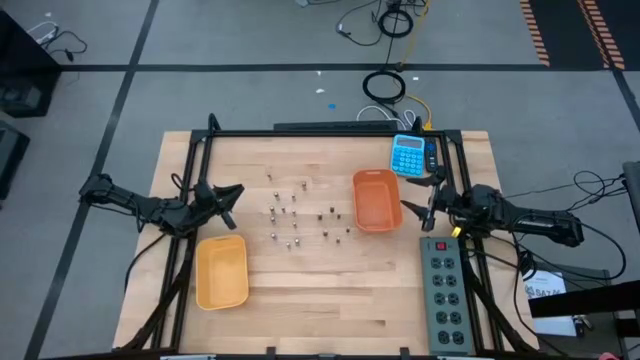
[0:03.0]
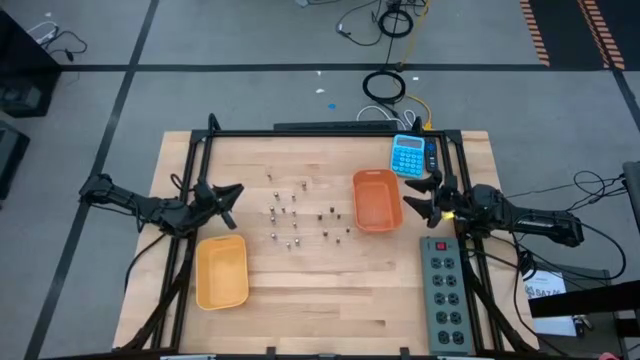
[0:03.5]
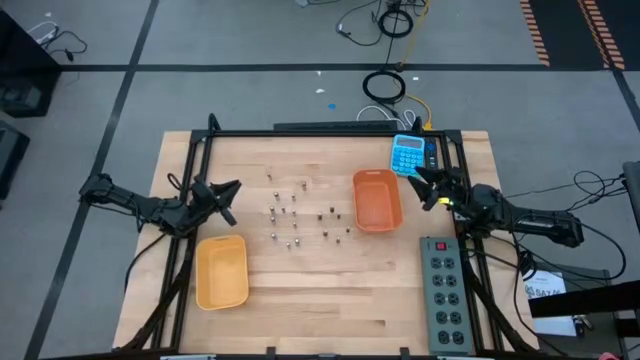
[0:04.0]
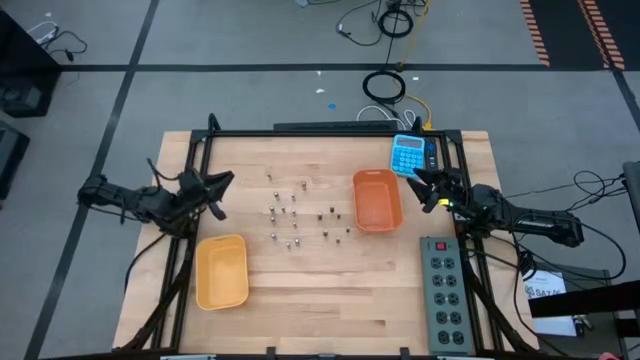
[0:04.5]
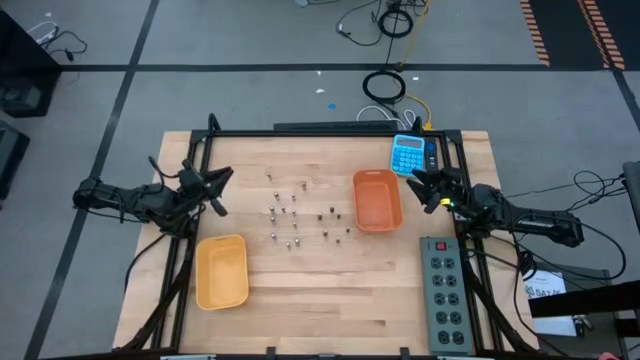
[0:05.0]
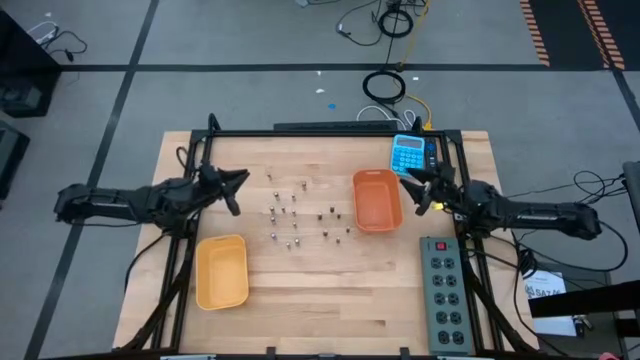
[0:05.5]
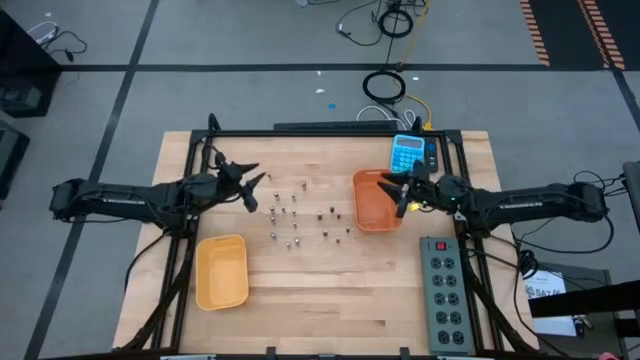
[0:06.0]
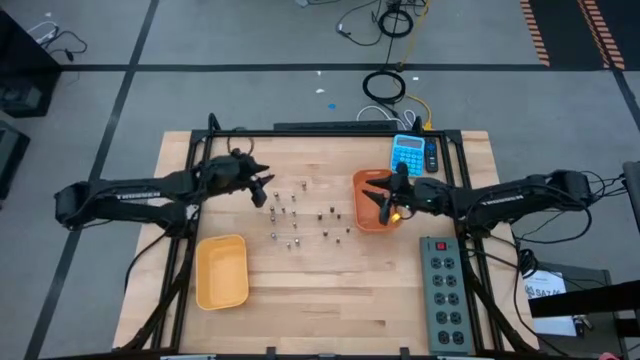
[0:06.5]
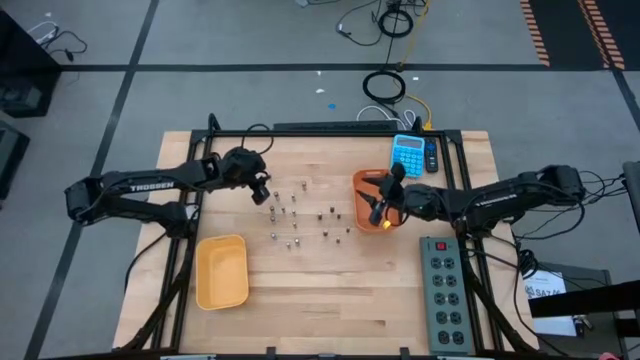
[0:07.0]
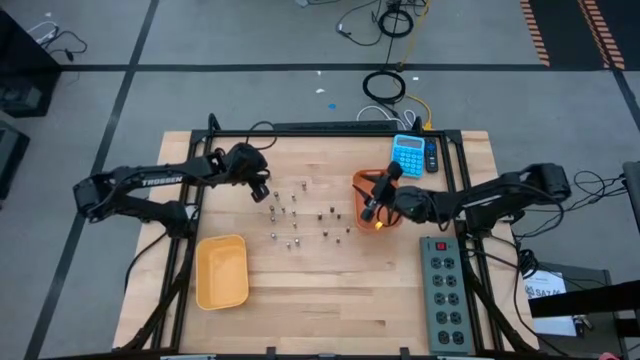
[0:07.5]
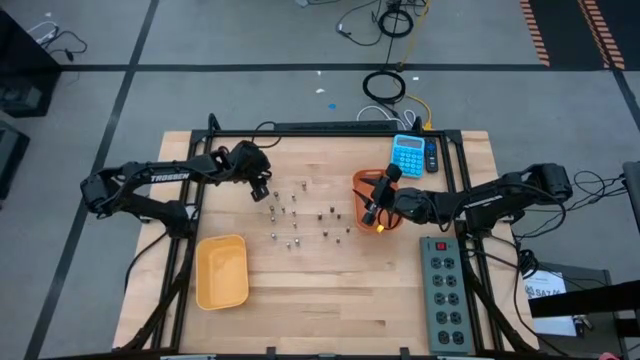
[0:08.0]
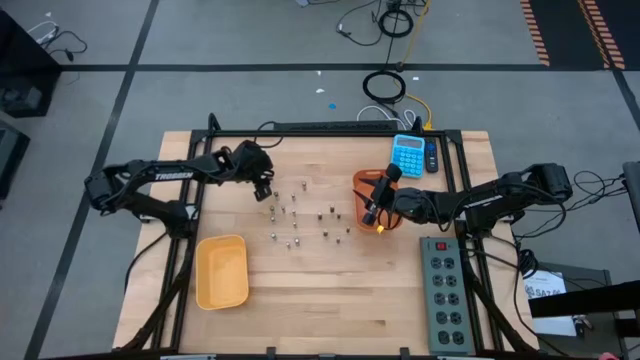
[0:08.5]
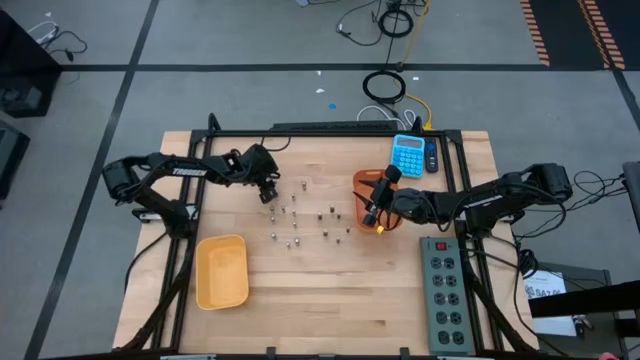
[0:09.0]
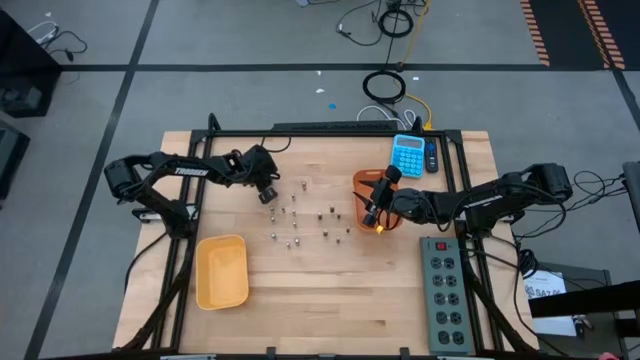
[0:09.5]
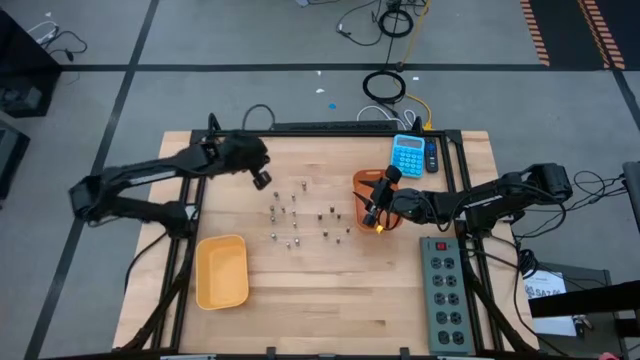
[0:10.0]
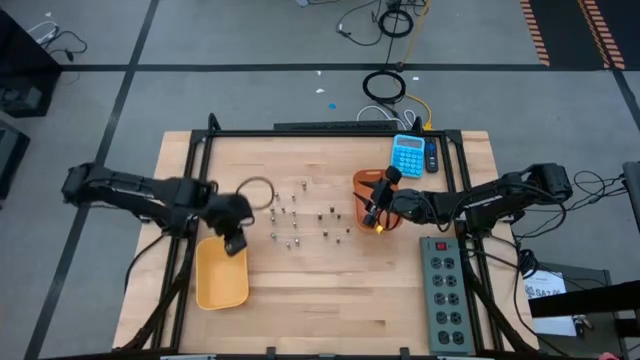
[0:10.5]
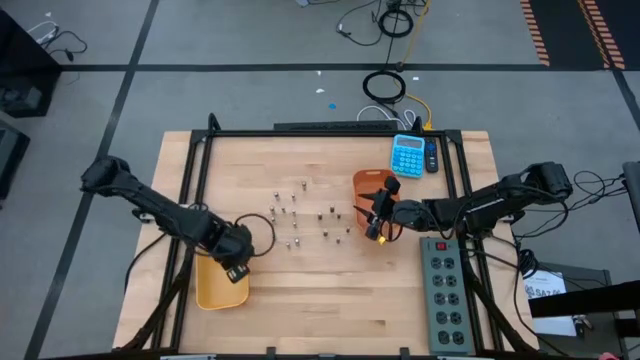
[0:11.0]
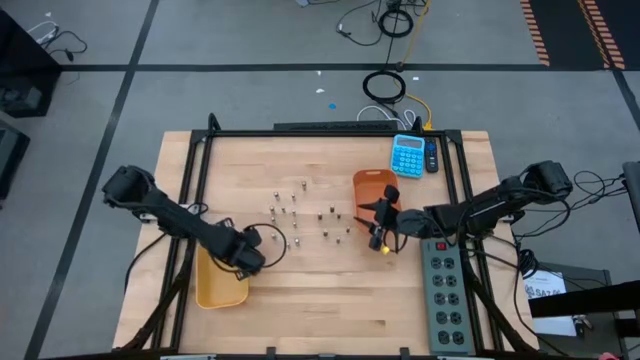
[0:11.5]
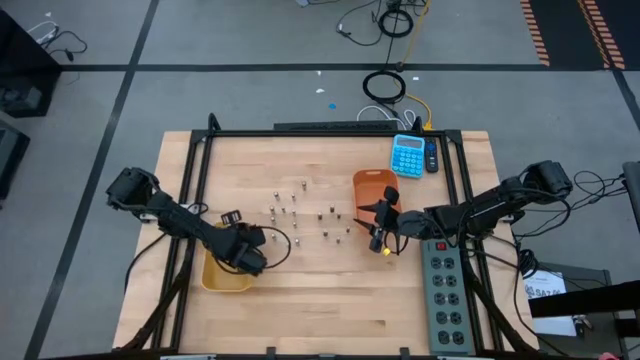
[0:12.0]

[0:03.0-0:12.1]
Task: Sort batteries
Put the silver black battery into the yellow bin

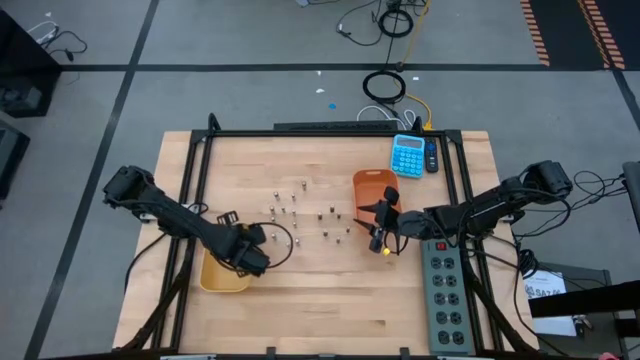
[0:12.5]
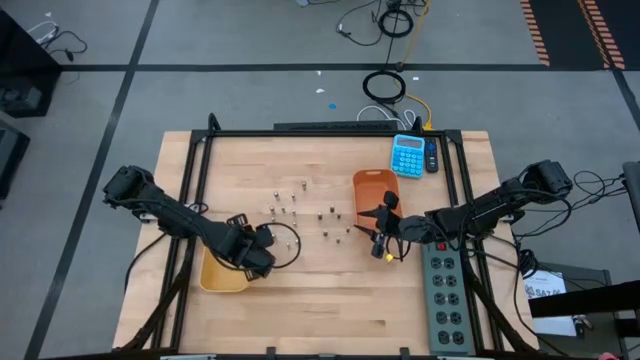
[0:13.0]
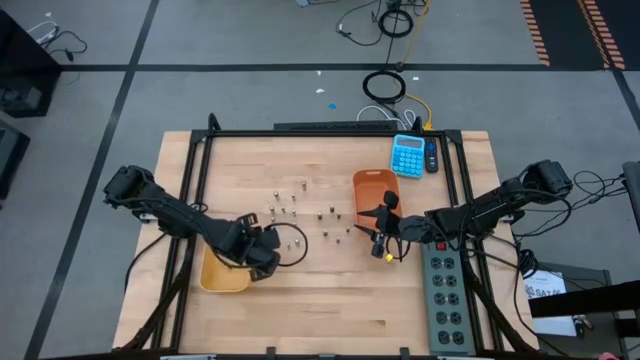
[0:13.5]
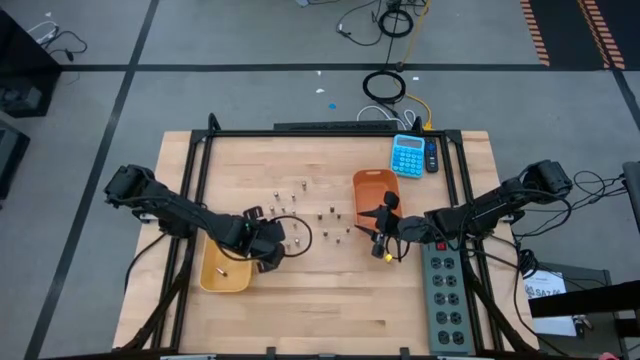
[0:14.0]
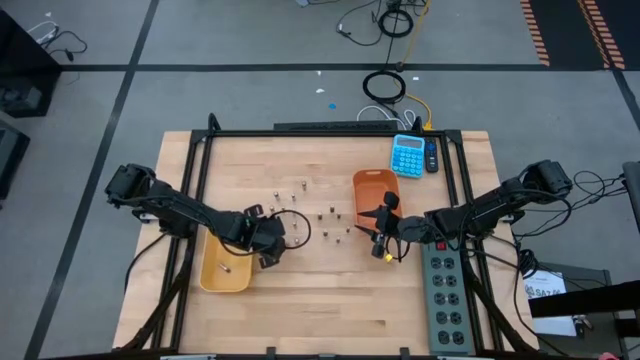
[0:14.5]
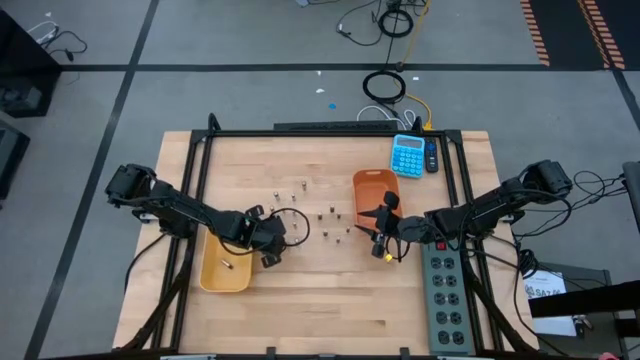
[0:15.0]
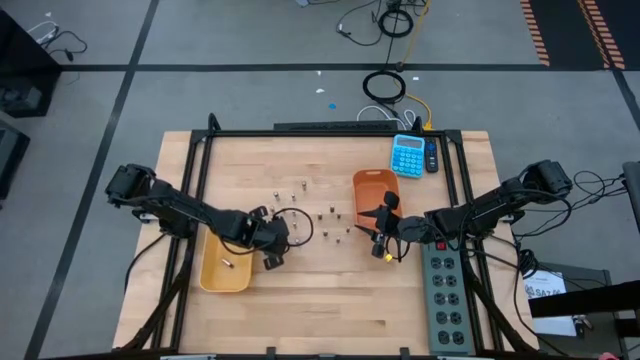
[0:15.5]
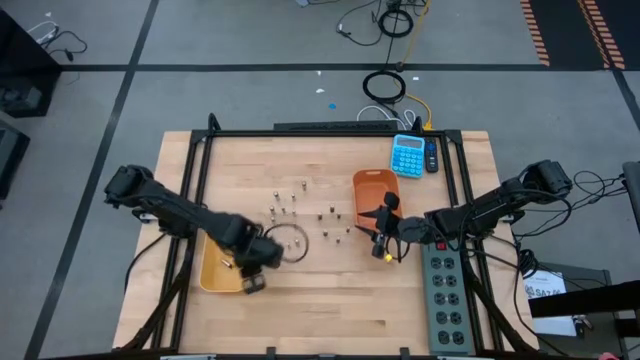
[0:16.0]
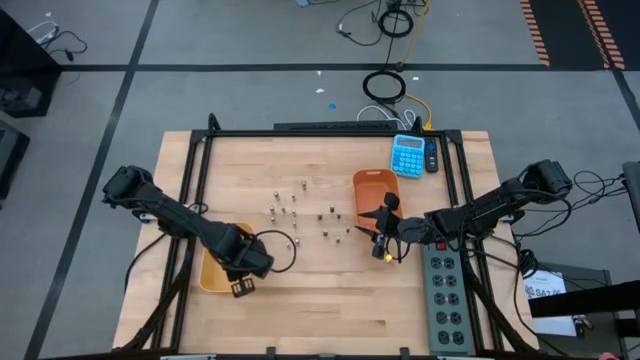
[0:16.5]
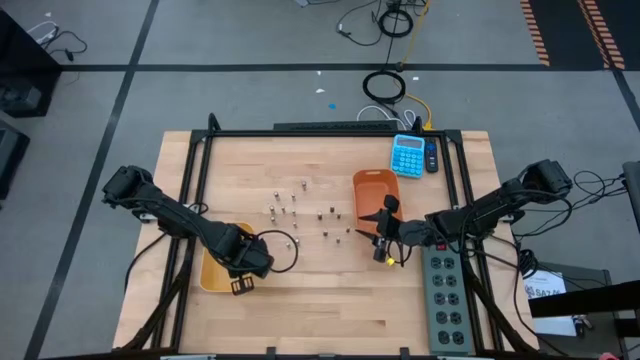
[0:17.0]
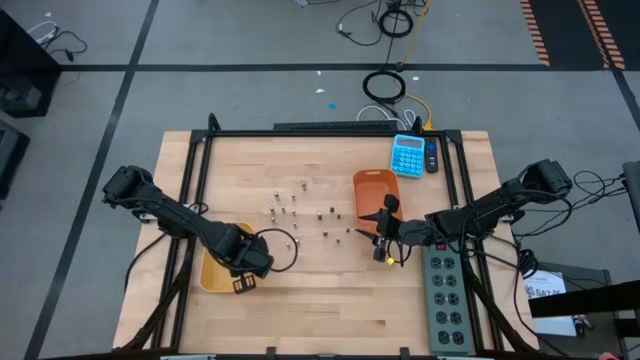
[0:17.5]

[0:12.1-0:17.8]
Put the silver black battery into the yellow bin

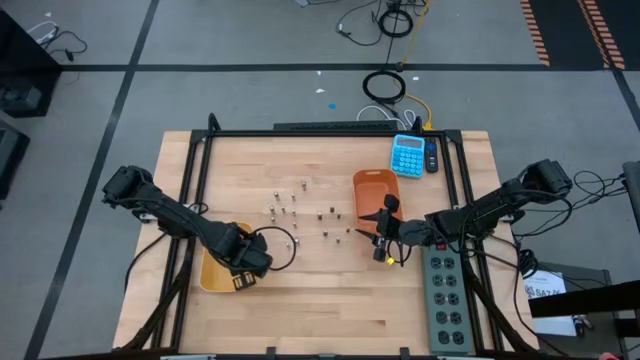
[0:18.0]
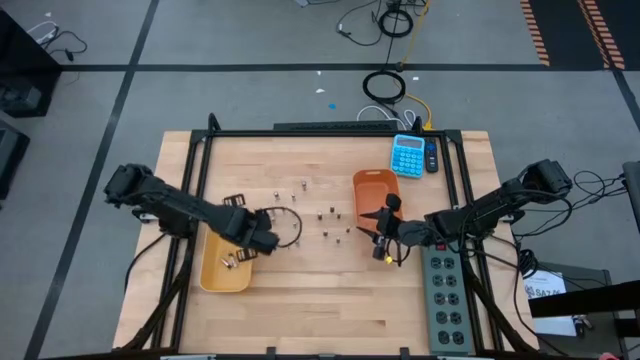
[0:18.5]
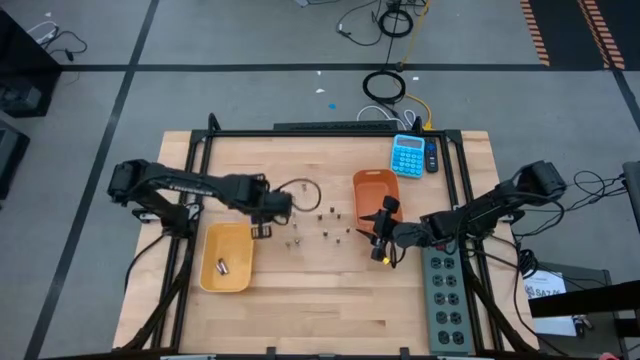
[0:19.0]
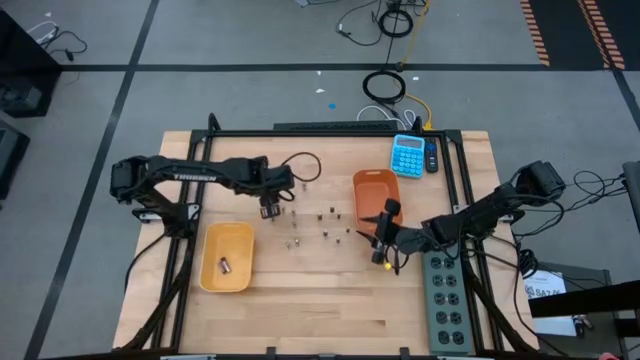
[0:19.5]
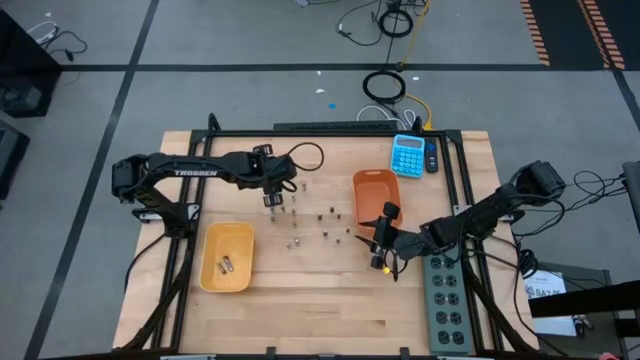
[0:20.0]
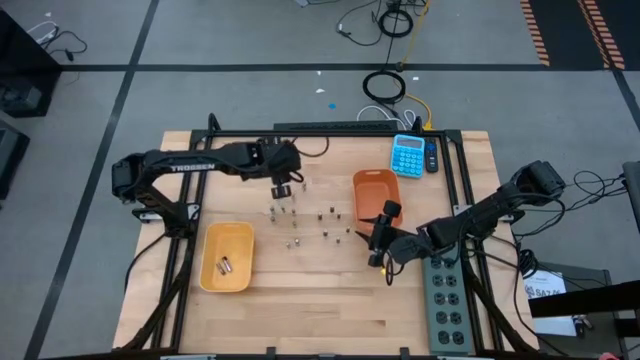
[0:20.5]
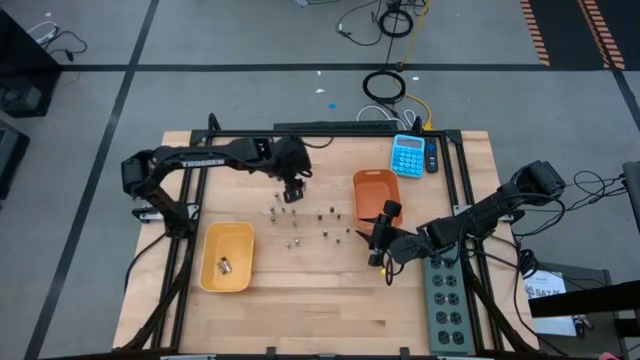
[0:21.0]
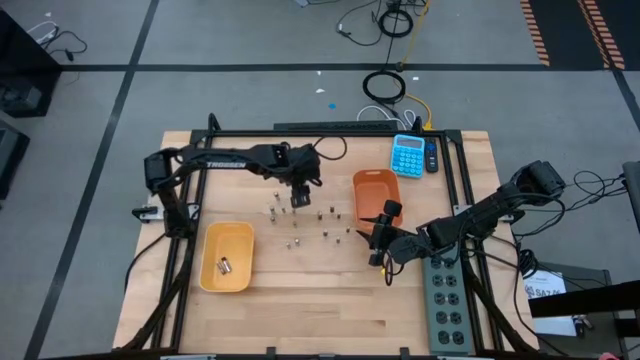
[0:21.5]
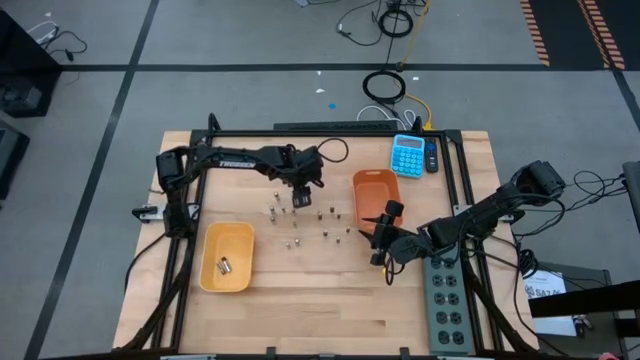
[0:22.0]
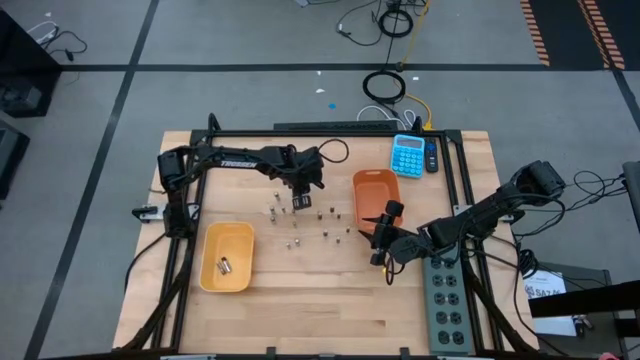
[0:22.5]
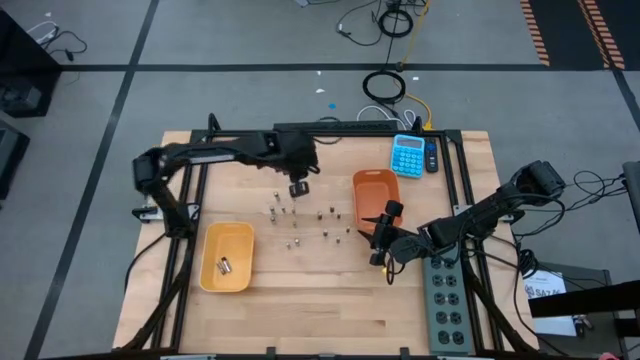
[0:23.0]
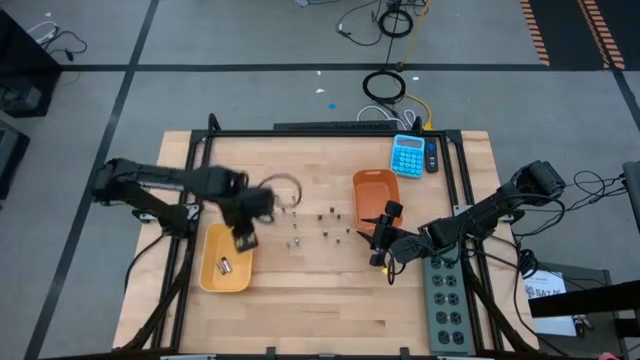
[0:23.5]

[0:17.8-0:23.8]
Put the silver black battery into the yellow bin
